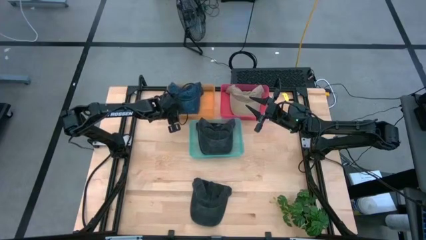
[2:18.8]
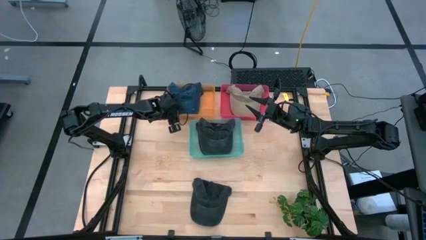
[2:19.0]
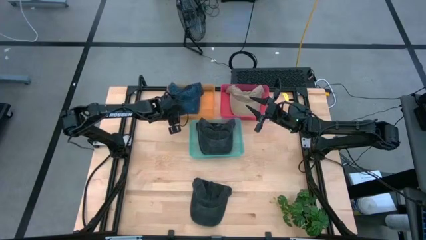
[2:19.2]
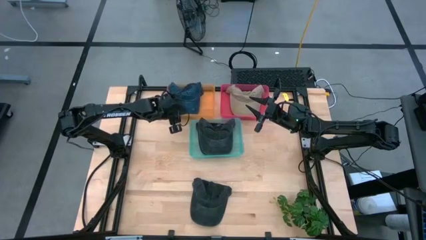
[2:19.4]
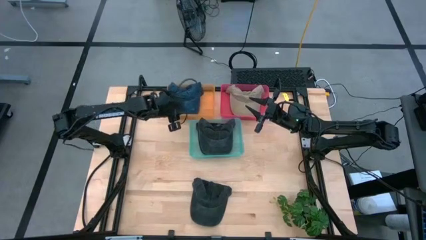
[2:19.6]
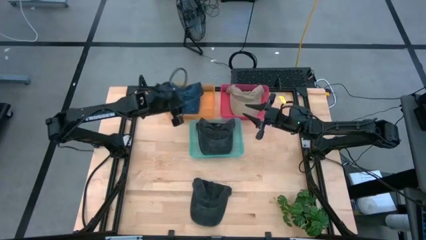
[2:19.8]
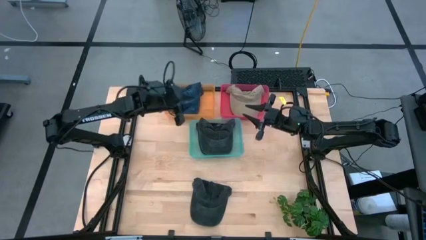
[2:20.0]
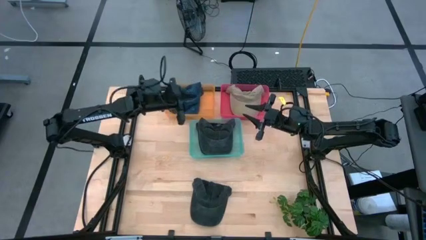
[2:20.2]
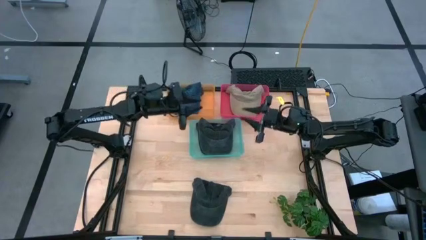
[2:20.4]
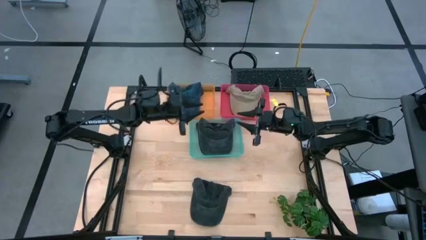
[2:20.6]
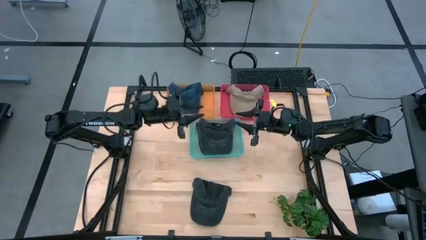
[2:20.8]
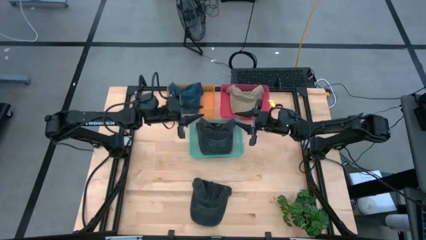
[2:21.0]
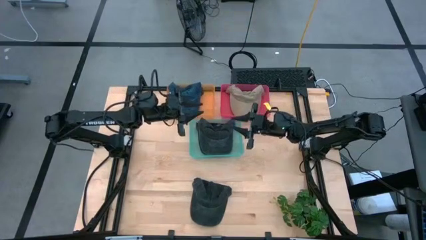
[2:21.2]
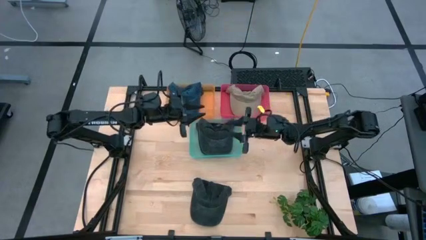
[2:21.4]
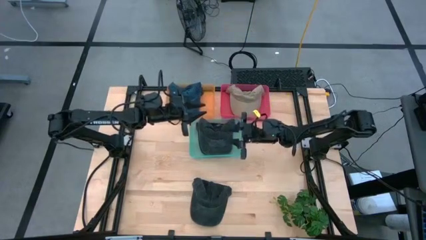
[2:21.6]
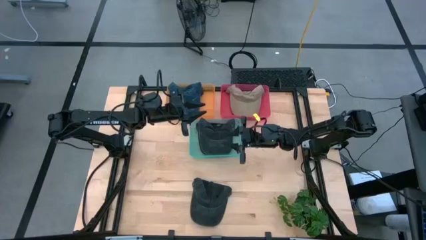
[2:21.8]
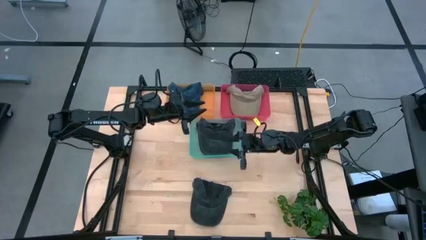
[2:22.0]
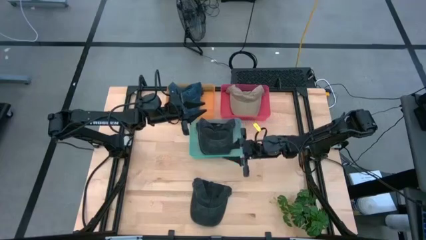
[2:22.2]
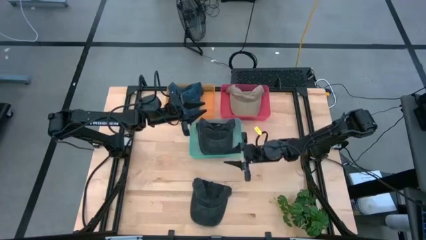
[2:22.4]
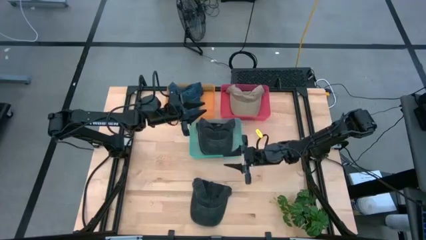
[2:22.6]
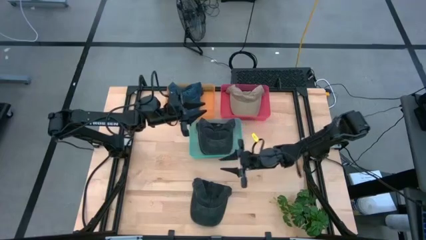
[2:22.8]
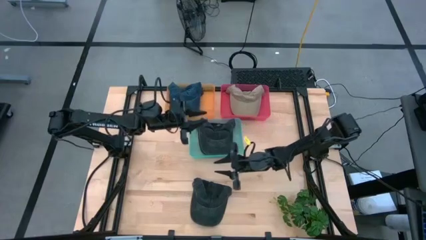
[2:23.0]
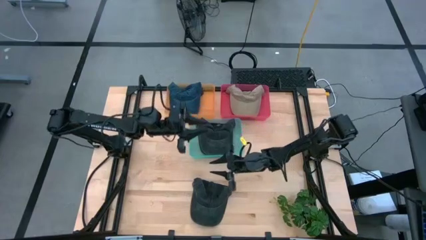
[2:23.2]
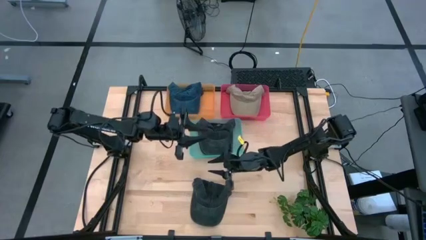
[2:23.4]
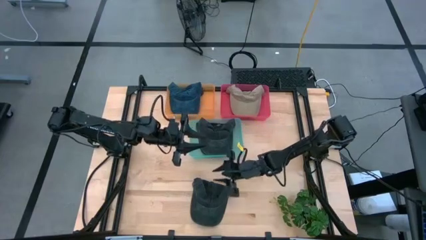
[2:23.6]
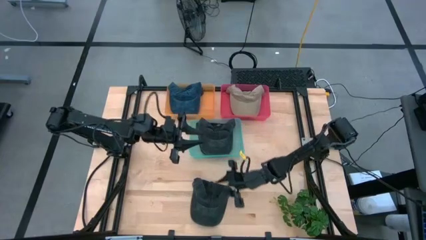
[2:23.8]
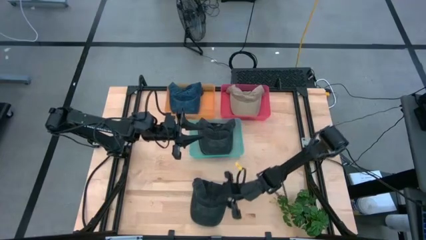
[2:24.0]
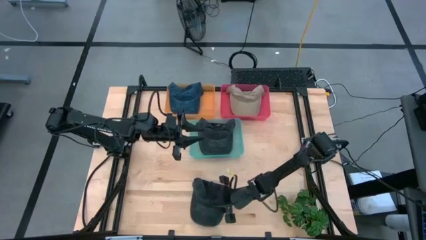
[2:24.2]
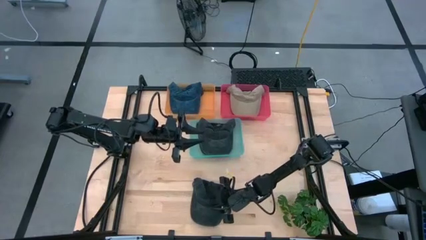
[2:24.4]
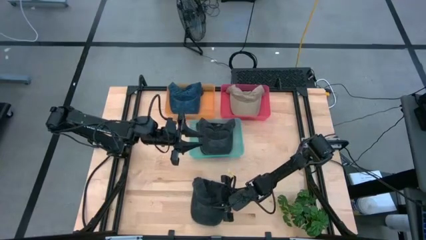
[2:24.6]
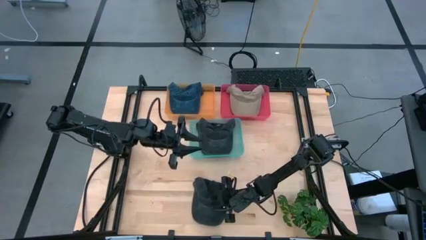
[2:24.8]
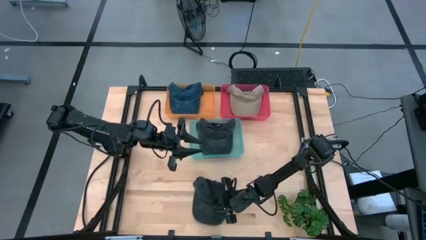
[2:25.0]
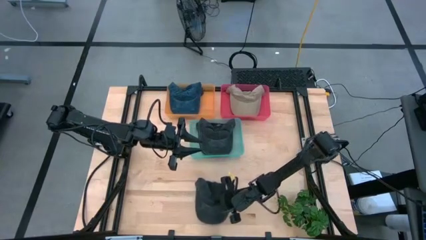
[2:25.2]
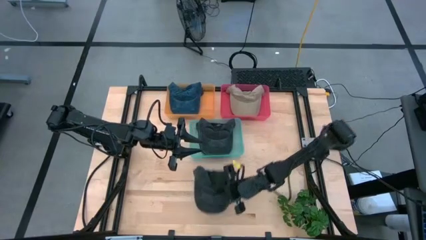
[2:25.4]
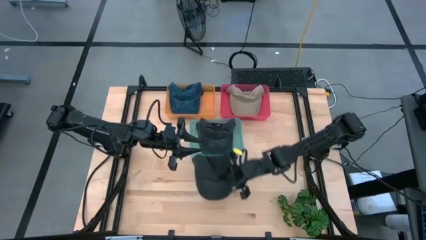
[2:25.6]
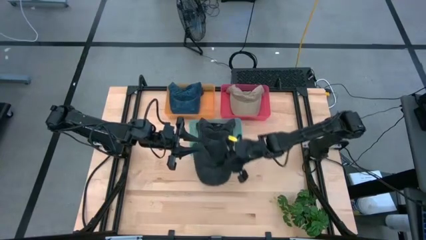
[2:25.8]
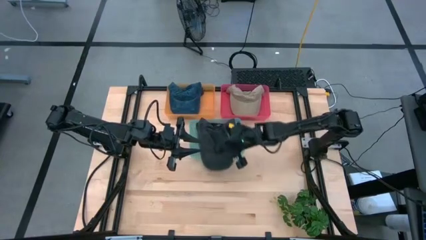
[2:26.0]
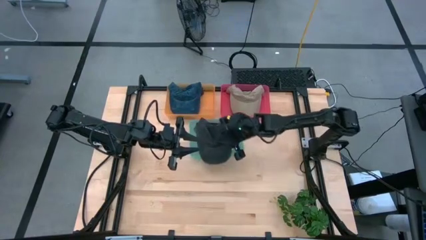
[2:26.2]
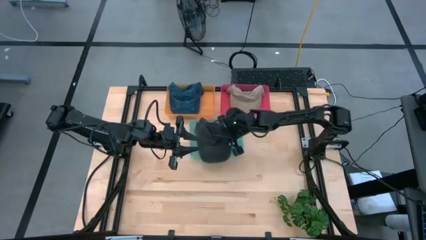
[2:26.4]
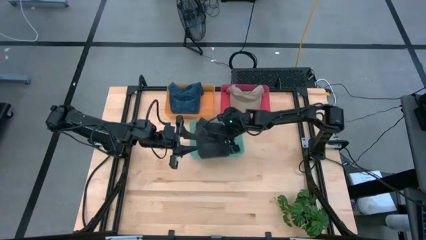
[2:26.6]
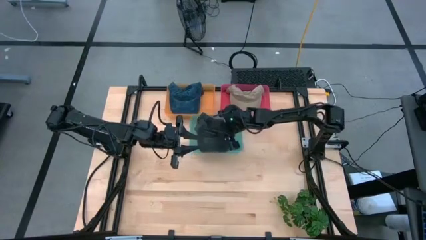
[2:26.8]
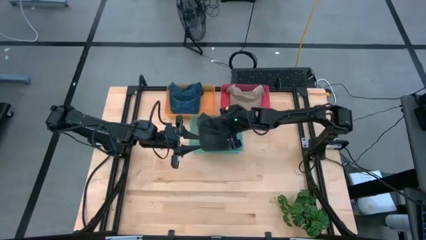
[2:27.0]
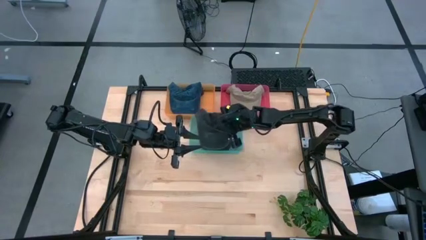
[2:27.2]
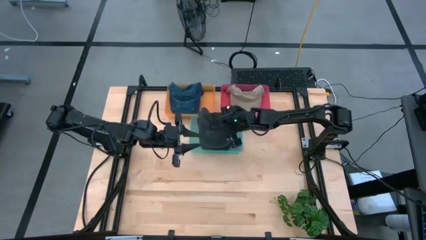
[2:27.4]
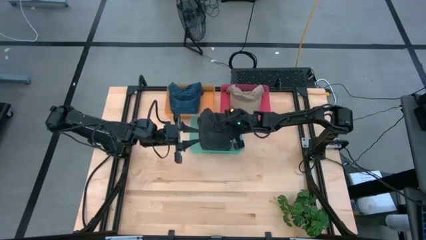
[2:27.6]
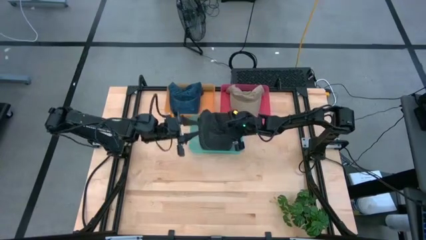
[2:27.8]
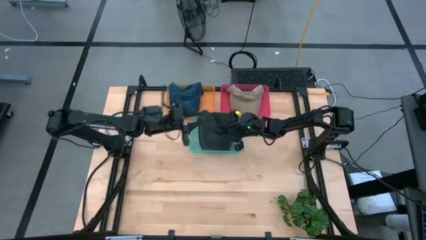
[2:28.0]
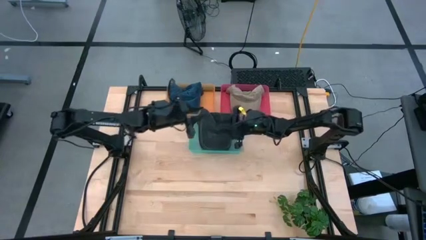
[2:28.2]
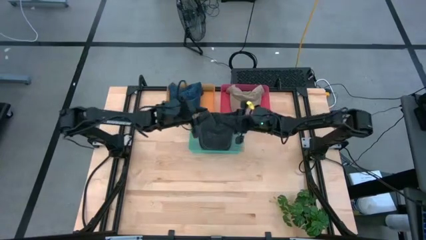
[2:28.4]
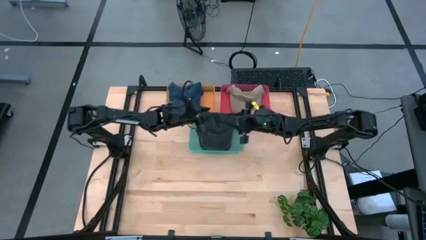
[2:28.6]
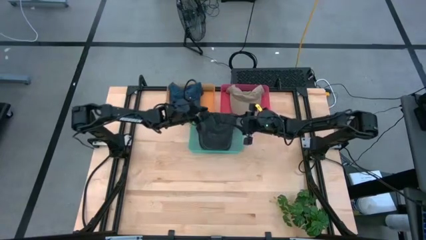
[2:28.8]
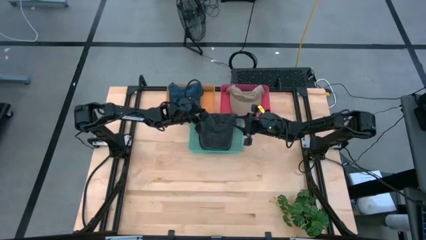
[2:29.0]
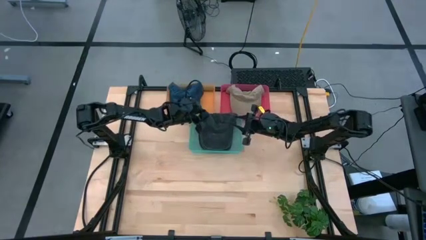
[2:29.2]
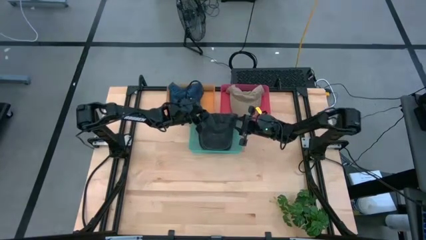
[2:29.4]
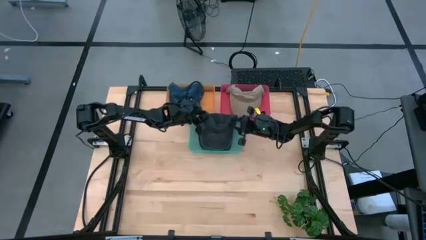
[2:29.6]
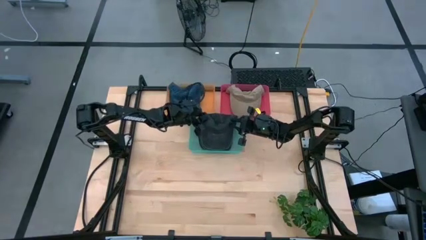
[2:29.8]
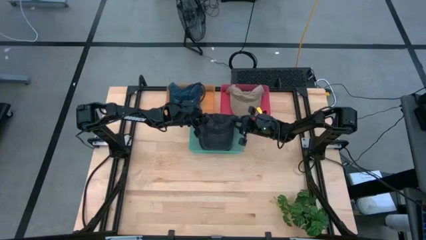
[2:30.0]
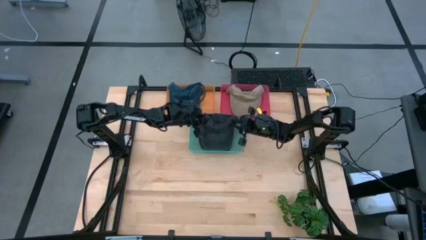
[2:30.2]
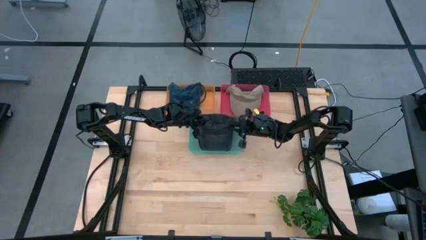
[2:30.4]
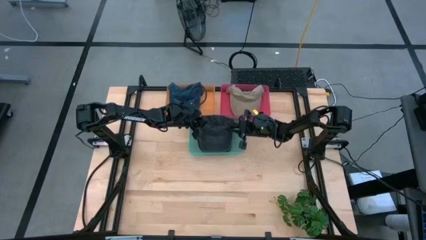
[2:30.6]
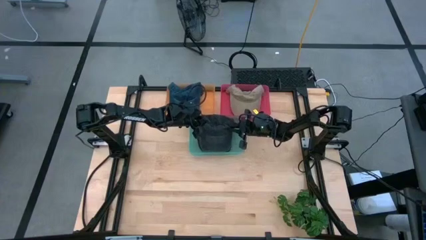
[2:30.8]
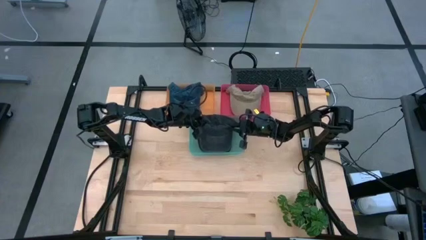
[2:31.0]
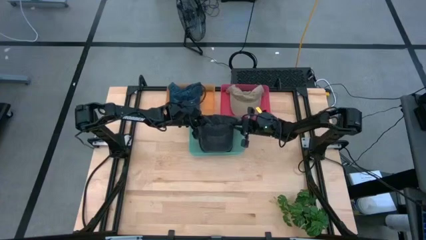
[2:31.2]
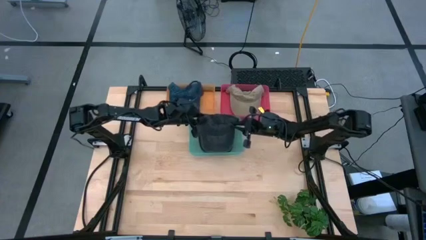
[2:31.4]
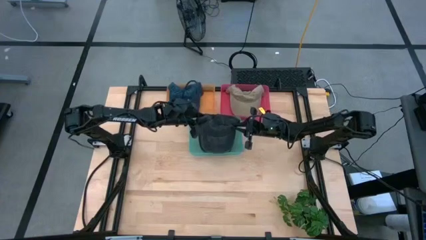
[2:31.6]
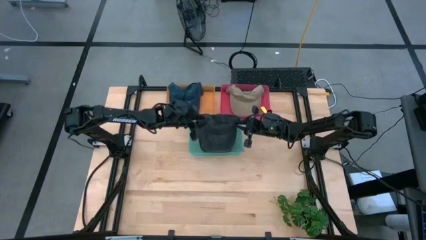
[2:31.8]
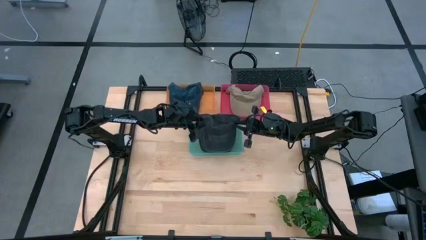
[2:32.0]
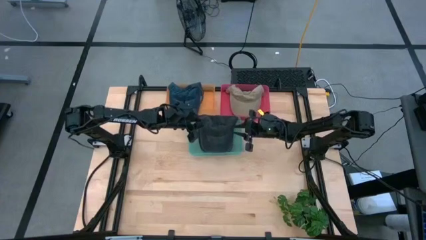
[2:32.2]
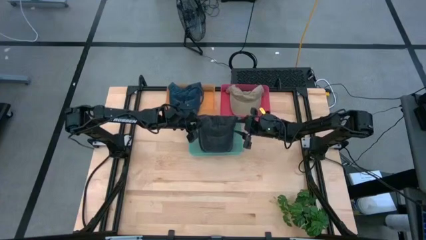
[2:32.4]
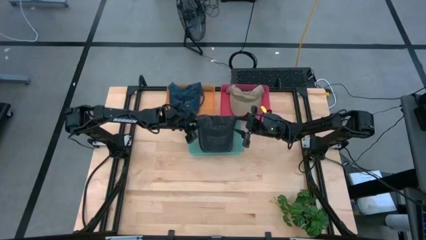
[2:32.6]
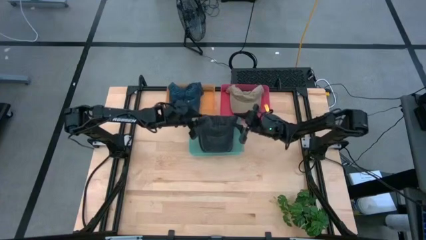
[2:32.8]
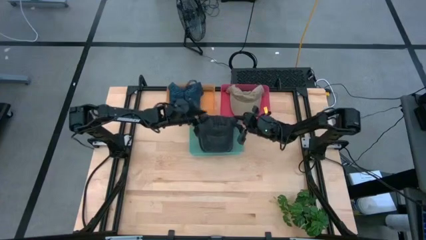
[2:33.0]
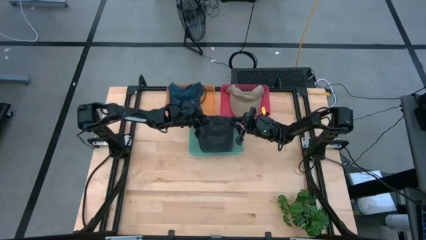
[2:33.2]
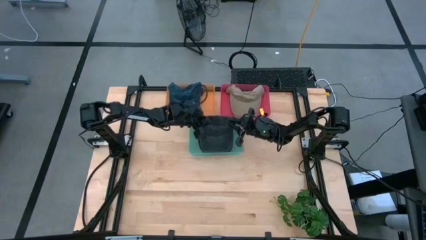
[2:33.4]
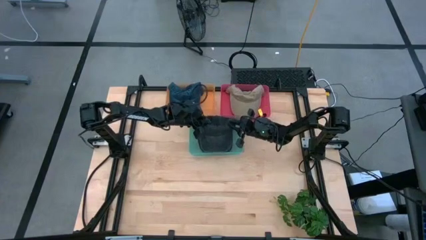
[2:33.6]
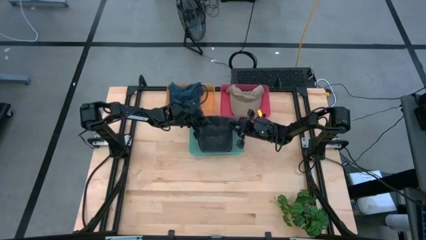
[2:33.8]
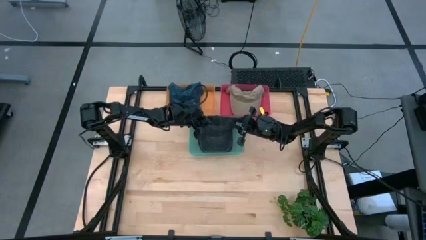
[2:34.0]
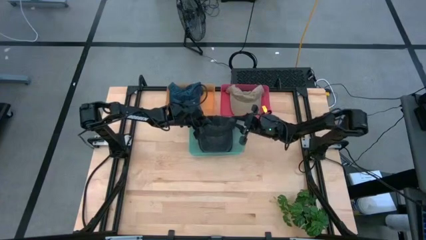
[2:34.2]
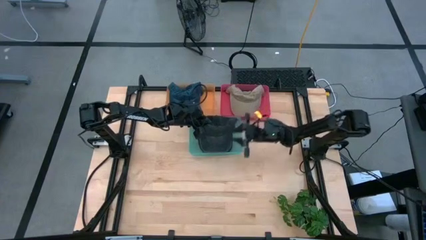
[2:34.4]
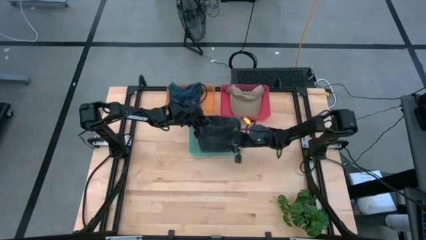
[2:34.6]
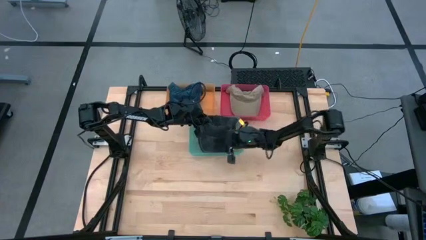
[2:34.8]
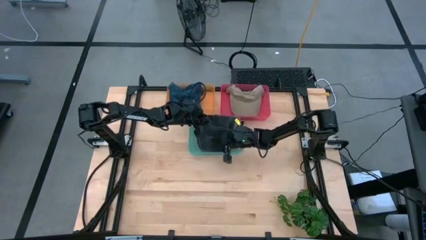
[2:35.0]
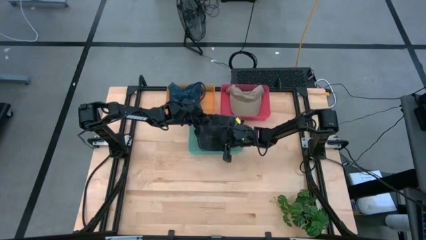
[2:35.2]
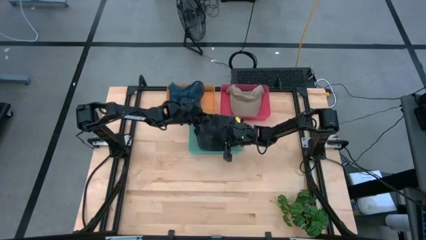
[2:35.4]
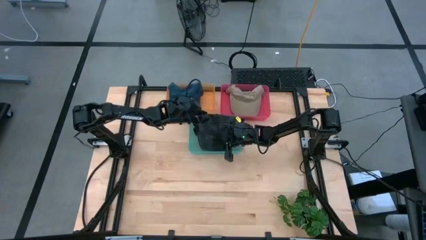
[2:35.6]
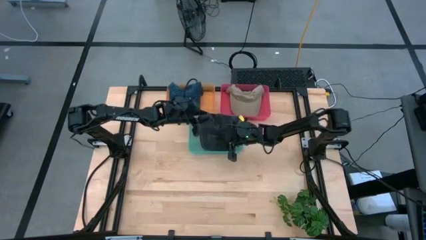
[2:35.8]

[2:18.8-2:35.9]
Task: Pick & Place hat
Put the black cap into the blue bin
